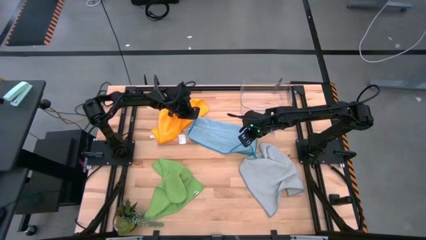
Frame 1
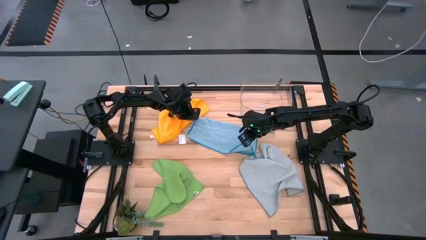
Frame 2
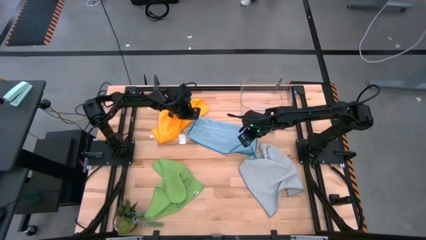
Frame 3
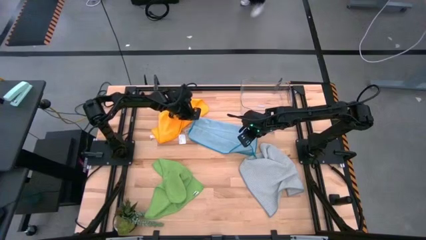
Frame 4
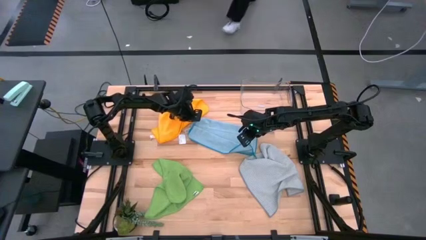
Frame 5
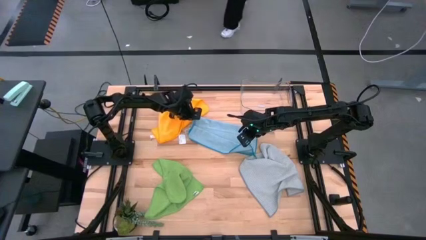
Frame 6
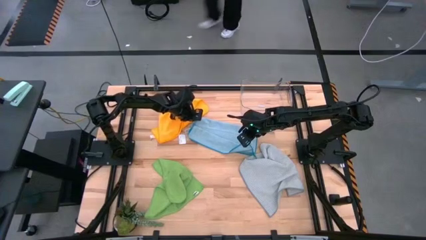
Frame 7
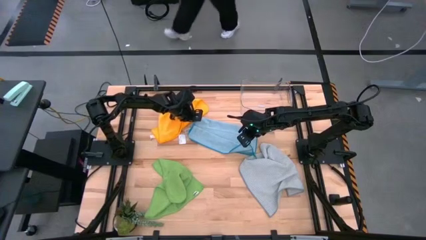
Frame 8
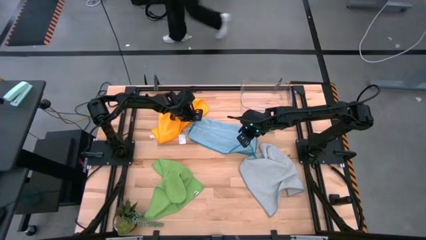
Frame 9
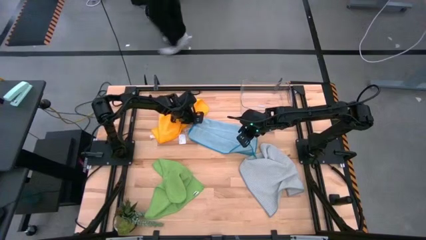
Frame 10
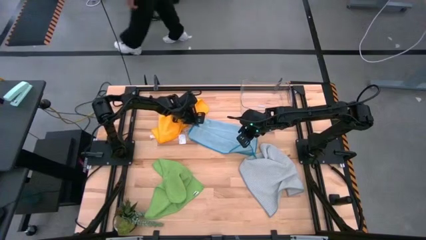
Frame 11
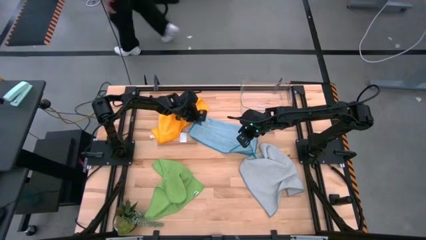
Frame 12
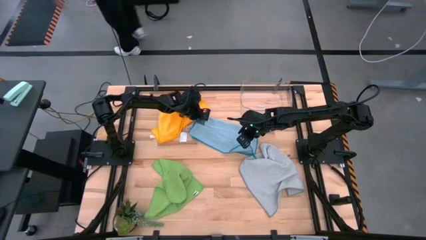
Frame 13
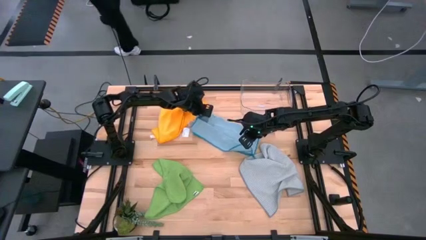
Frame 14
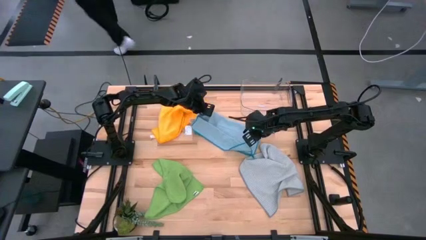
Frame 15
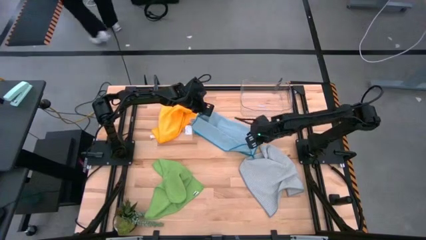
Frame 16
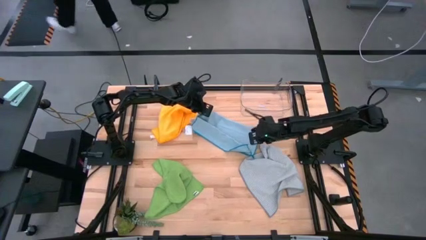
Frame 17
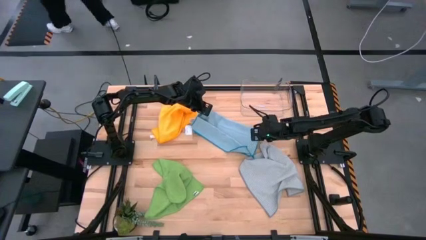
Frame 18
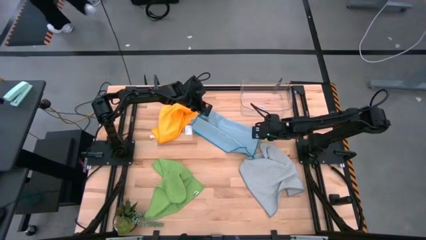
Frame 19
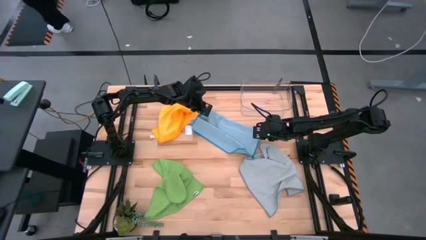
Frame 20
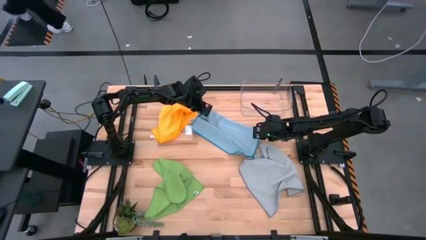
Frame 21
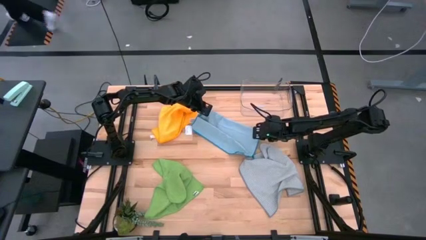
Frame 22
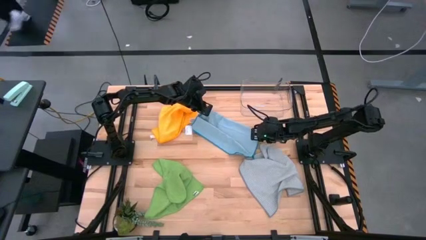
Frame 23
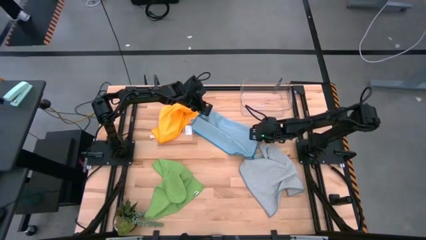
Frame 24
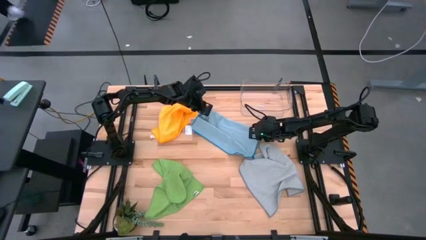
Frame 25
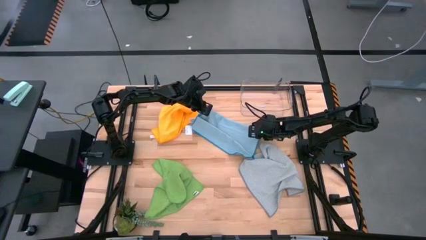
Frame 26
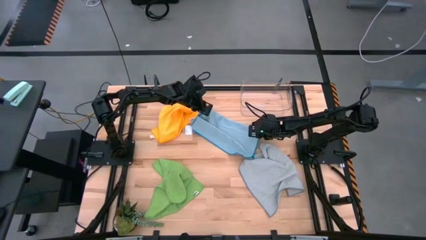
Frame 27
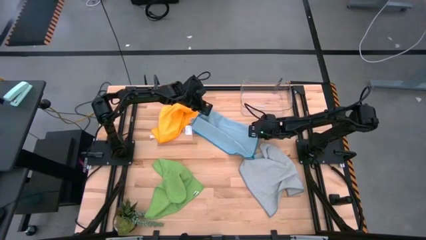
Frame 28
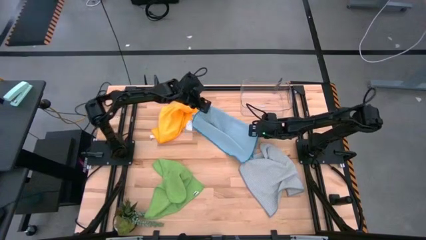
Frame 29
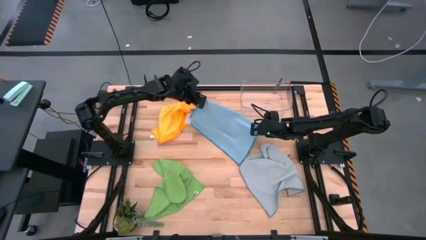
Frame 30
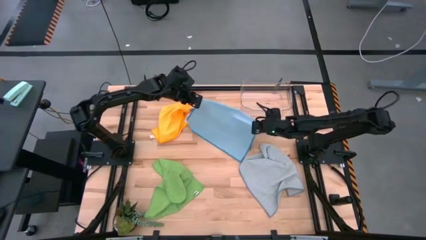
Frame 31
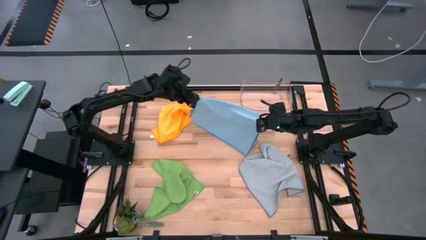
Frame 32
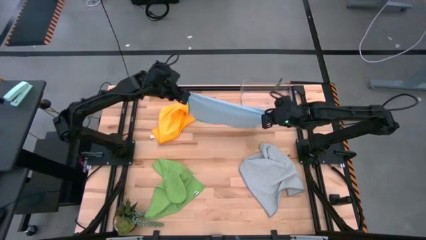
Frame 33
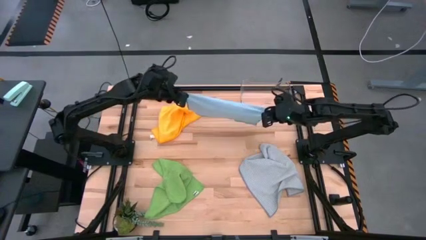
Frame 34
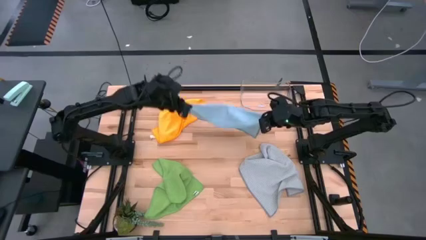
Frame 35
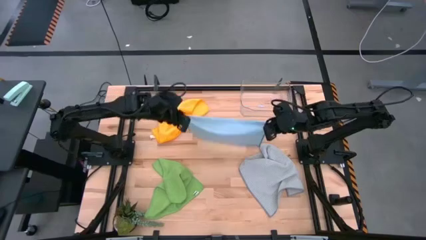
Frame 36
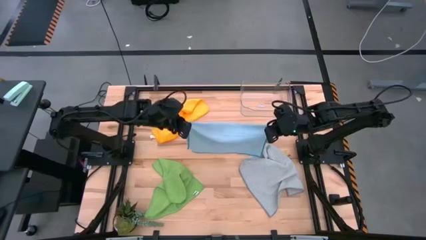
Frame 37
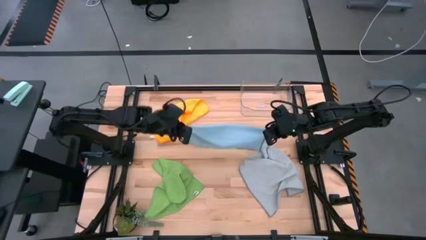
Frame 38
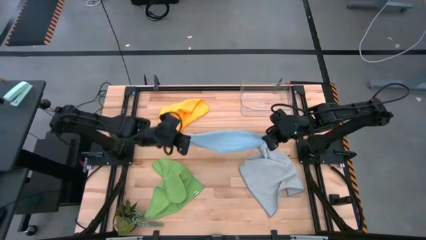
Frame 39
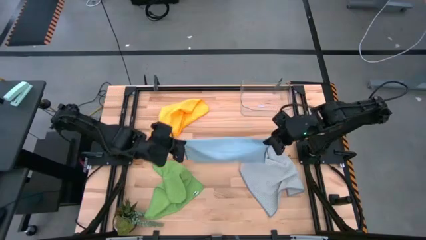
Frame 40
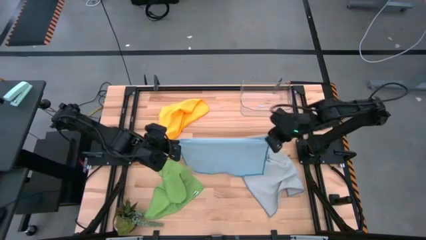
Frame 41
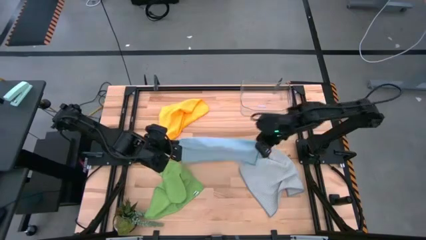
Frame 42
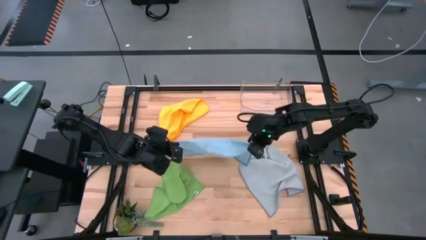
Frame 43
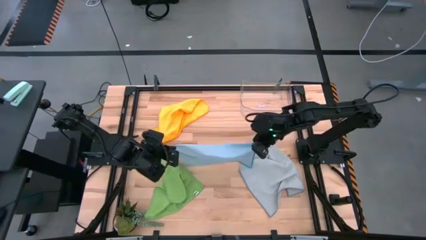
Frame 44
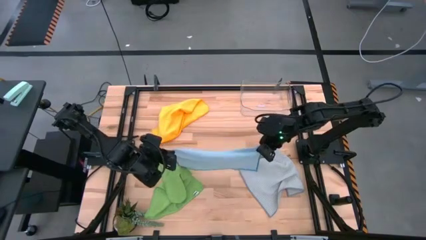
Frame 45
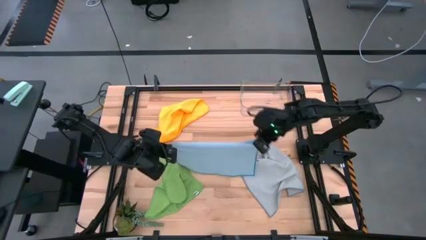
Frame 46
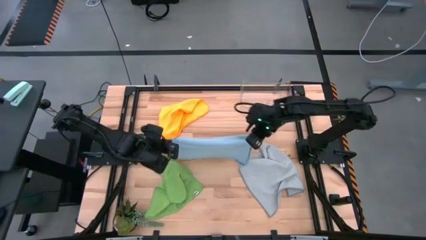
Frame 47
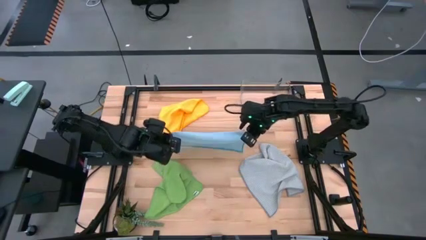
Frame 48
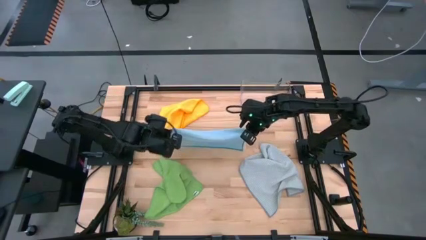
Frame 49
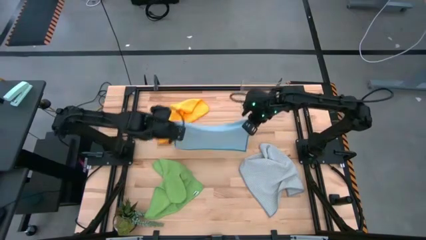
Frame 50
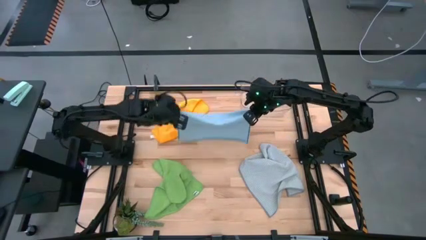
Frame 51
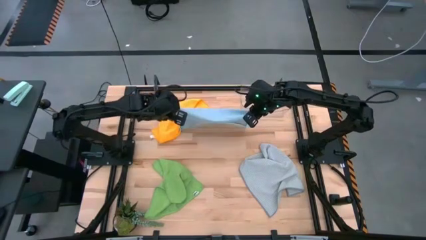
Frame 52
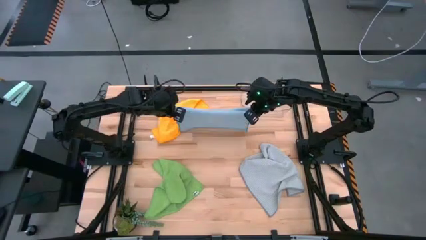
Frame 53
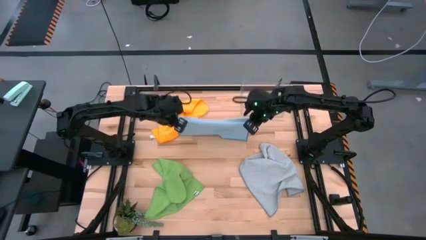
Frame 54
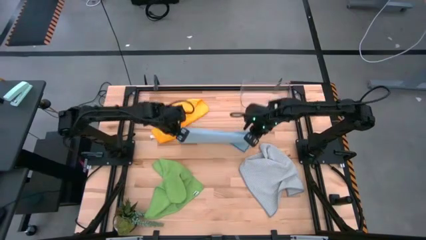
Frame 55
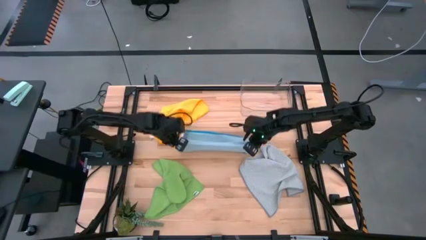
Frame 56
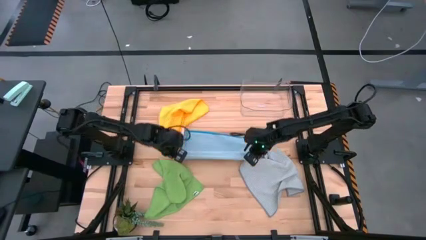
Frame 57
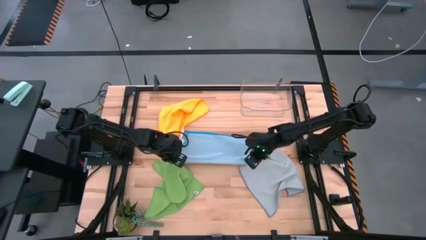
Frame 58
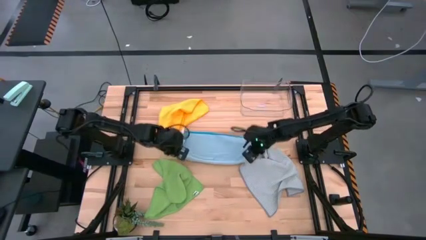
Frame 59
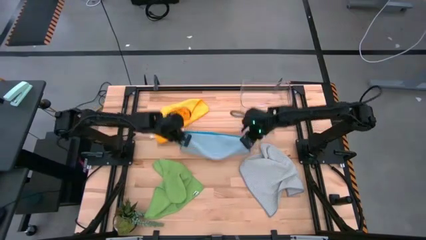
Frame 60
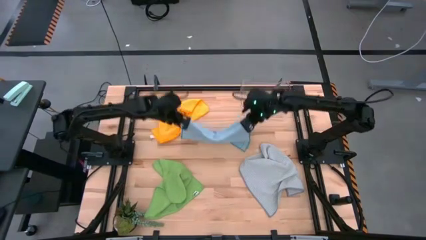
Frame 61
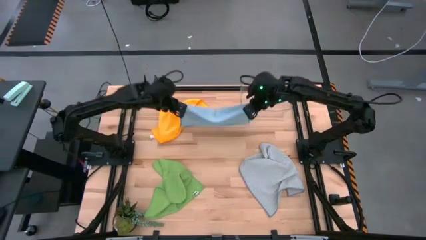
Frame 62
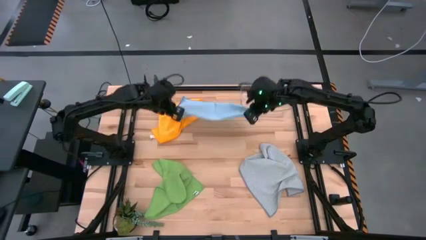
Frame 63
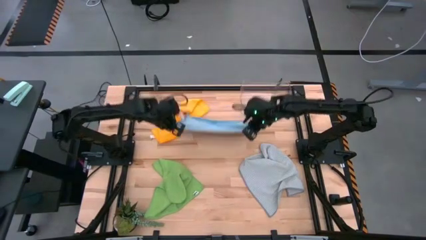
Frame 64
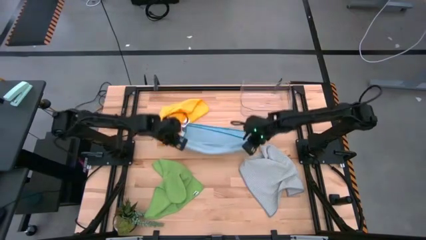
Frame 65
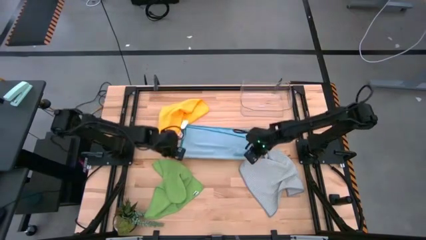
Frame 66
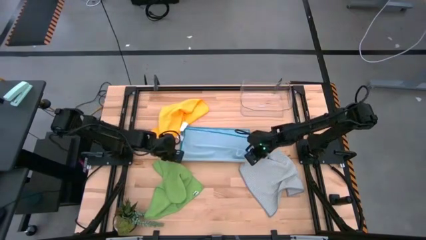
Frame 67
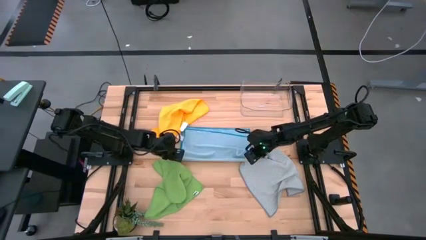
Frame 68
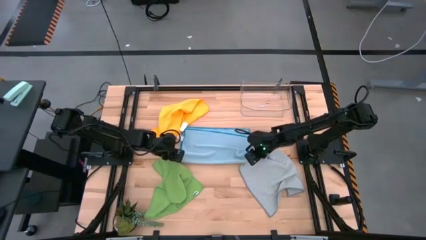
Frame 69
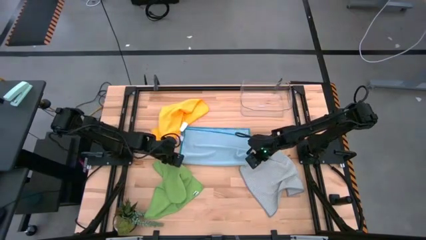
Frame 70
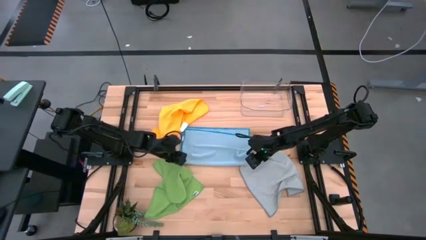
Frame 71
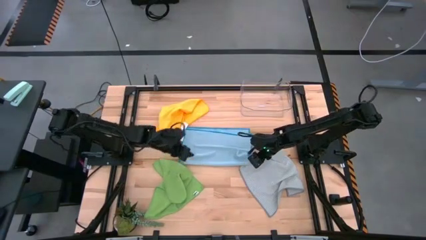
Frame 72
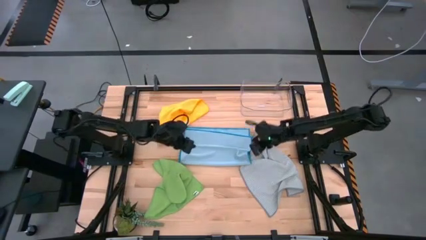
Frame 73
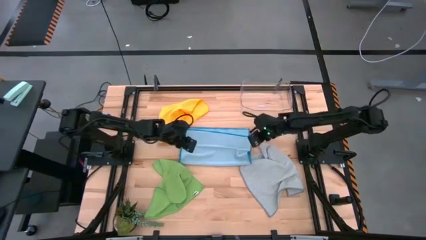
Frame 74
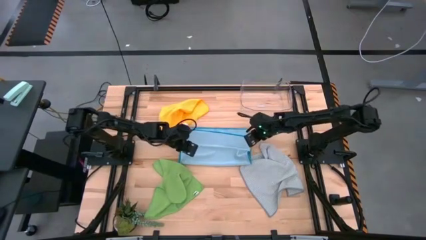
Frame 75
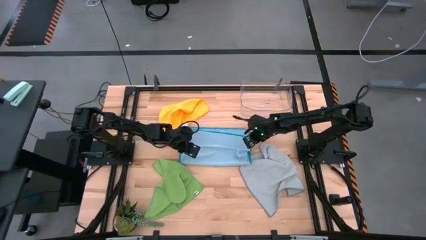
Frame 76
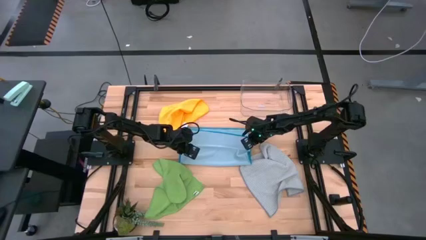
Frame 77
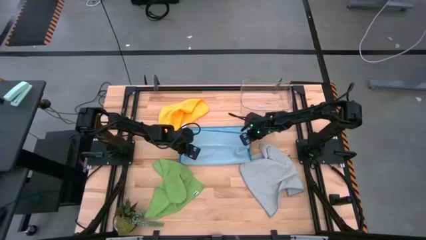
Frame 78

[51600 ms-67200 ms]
Task: Fold microfiber towels
Fold the blue microfiber cloth

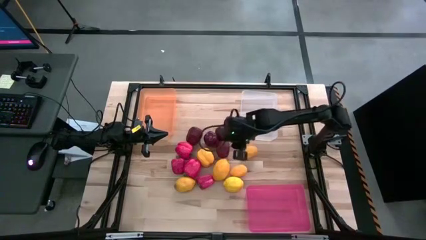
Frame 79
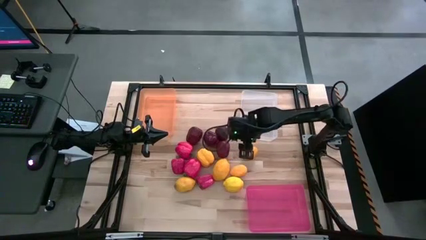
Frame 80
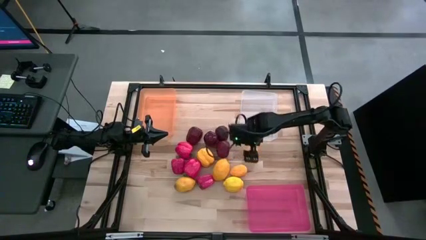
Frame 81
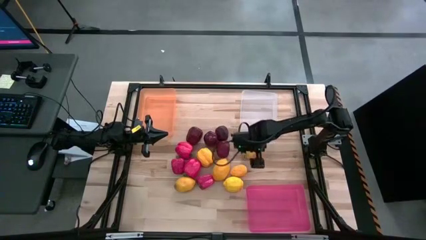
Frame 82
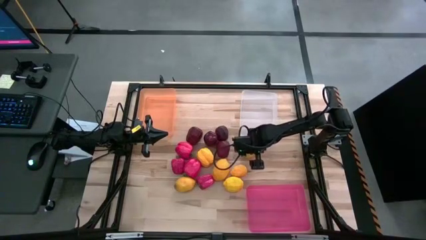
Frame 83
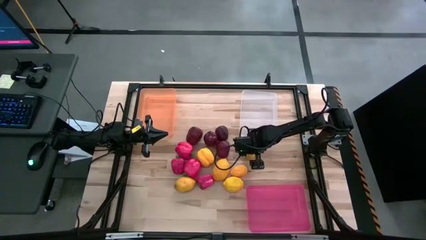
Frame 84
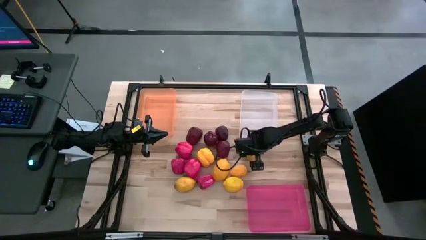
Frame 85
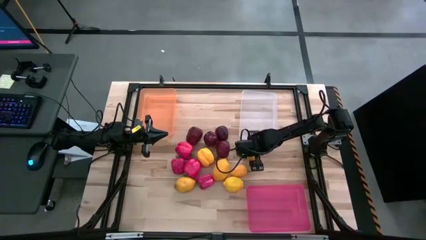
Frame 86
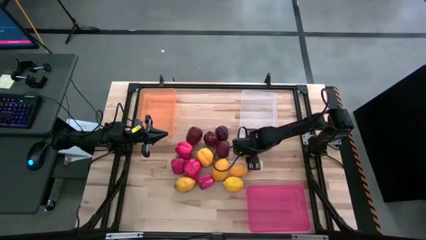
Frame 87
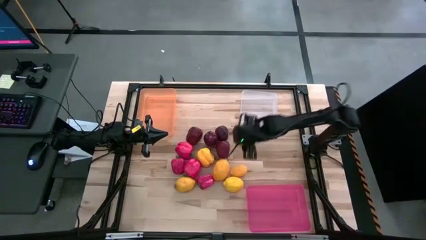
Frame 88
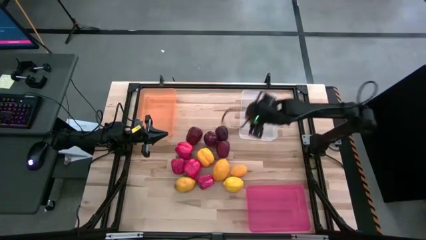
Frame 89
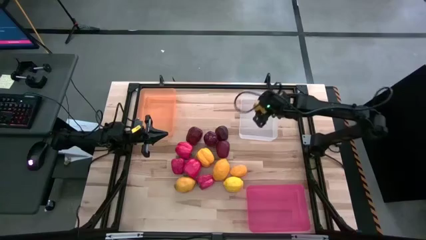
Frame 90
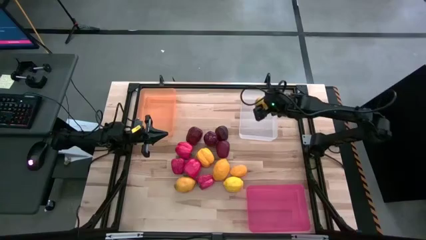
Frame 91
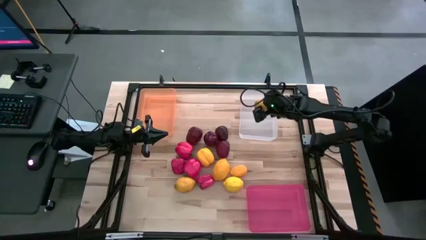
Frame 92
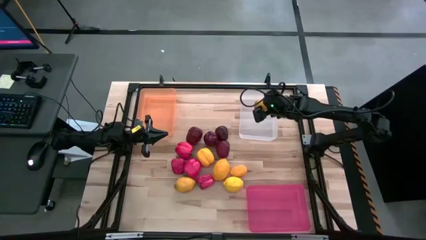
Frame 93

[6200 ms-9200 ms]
Task: Sort produce into baskets
Put the lemon into the white bin
